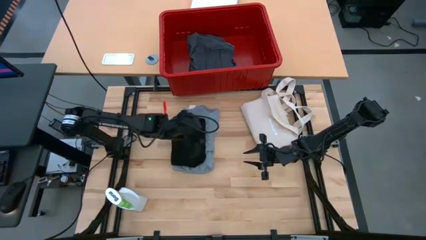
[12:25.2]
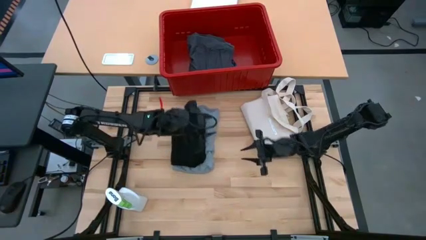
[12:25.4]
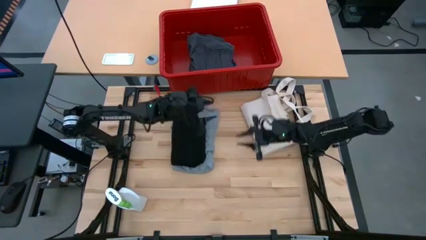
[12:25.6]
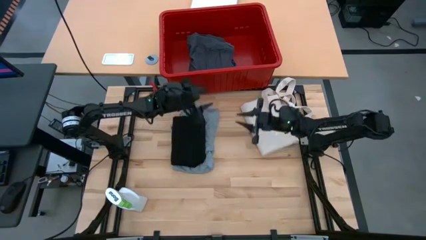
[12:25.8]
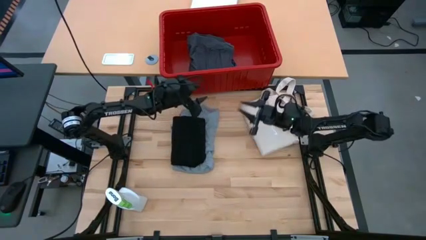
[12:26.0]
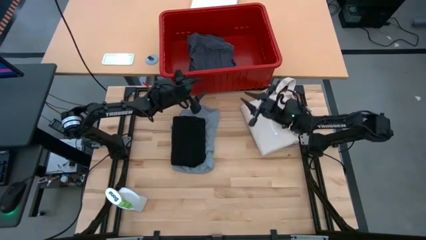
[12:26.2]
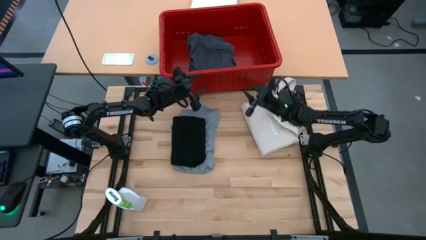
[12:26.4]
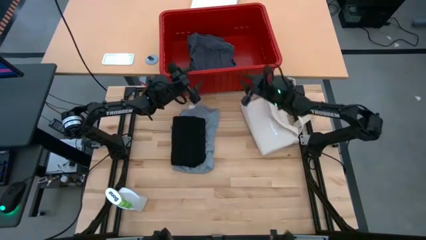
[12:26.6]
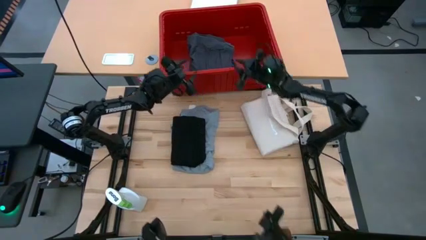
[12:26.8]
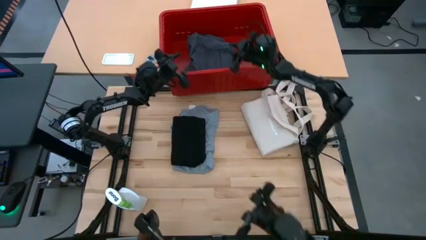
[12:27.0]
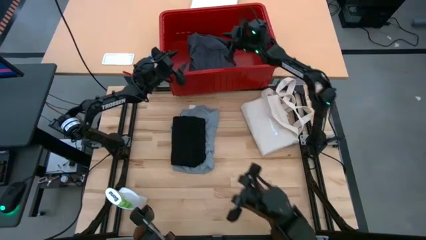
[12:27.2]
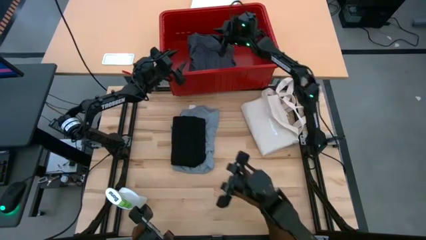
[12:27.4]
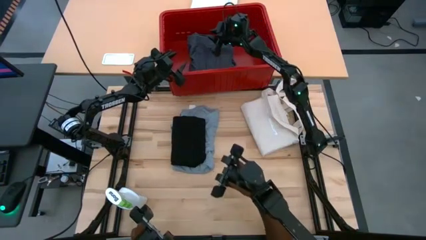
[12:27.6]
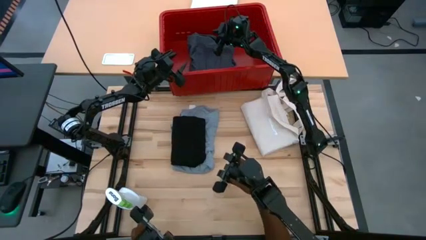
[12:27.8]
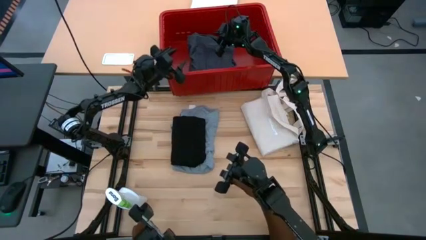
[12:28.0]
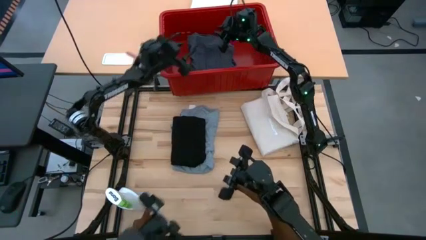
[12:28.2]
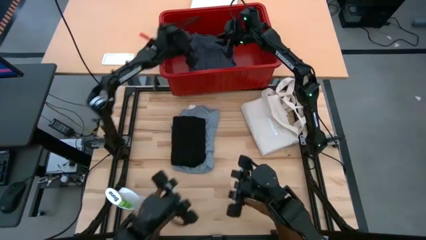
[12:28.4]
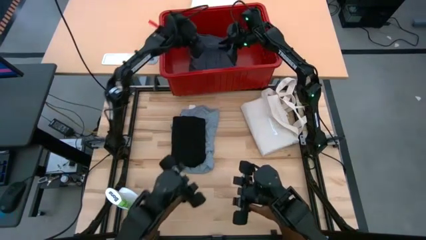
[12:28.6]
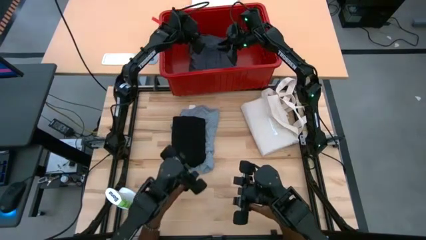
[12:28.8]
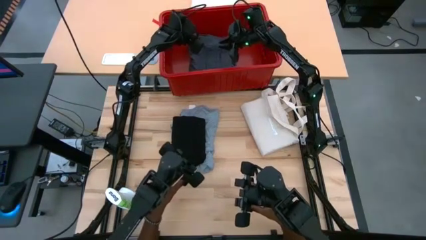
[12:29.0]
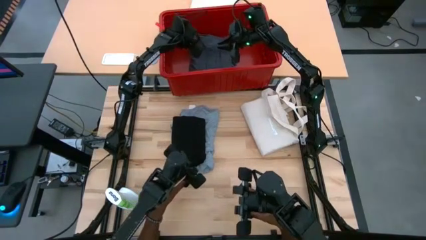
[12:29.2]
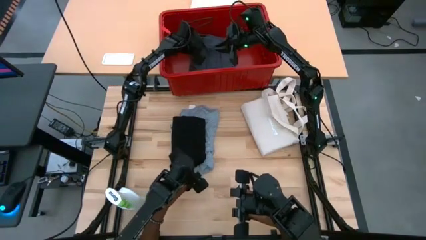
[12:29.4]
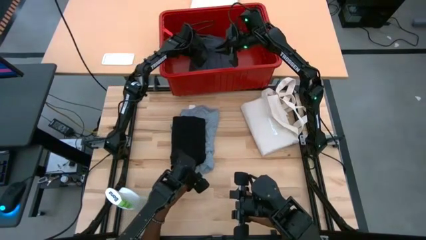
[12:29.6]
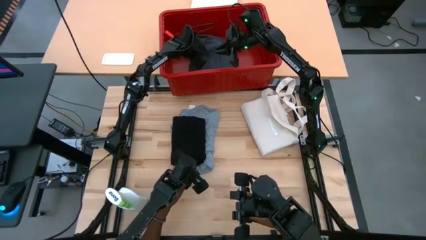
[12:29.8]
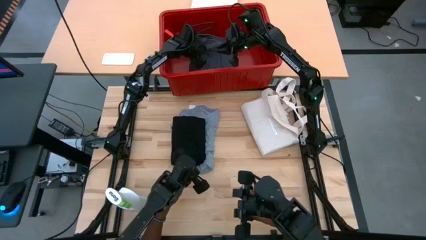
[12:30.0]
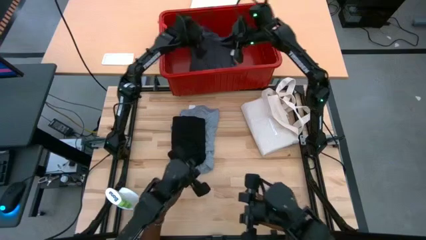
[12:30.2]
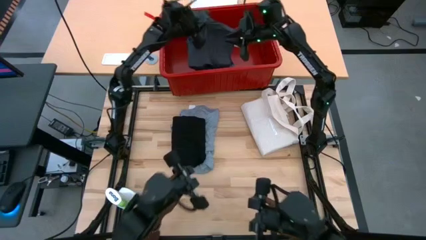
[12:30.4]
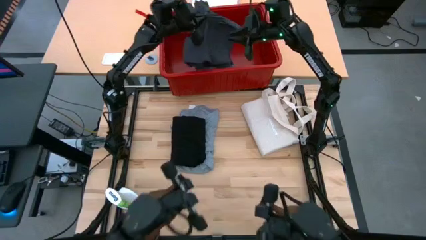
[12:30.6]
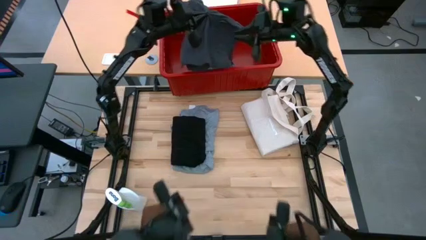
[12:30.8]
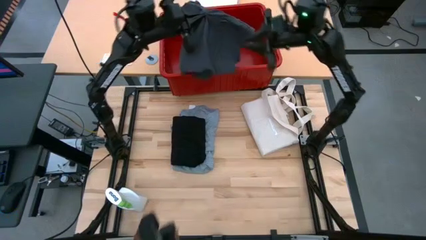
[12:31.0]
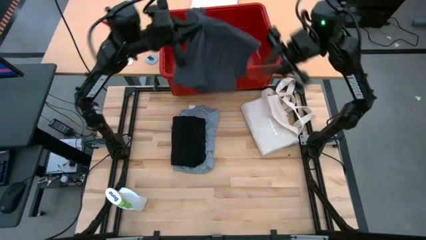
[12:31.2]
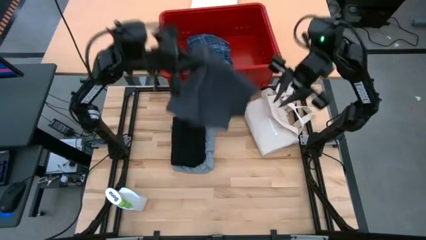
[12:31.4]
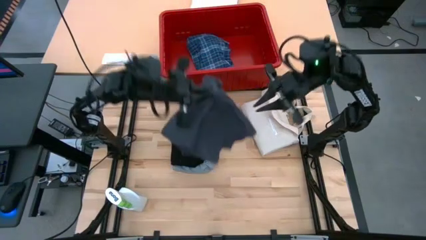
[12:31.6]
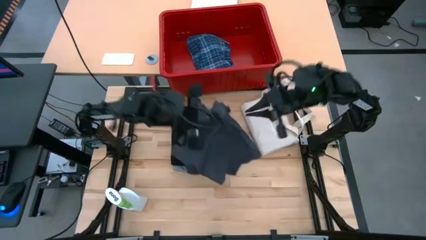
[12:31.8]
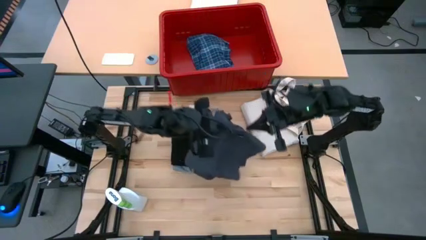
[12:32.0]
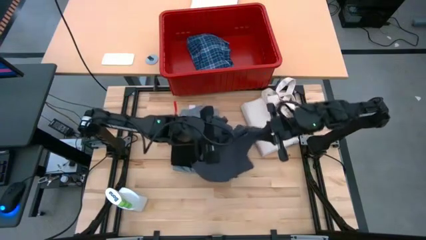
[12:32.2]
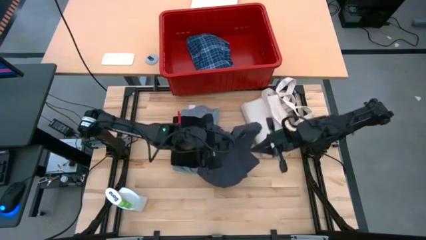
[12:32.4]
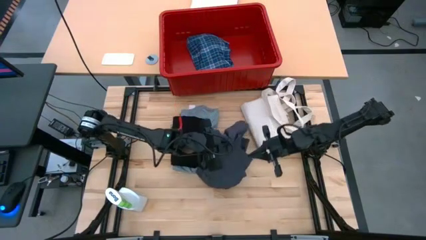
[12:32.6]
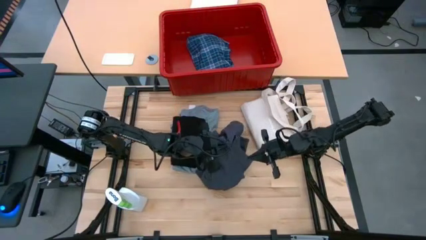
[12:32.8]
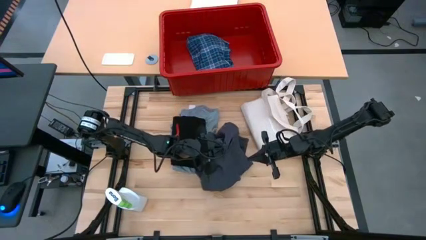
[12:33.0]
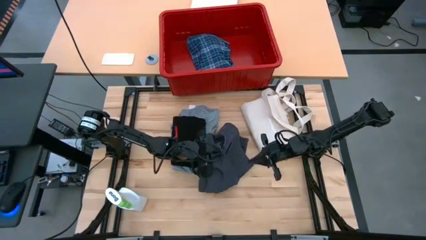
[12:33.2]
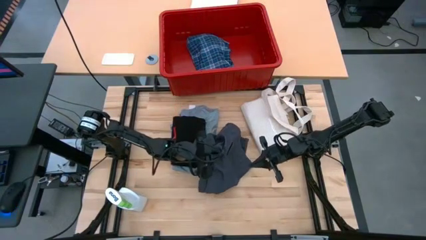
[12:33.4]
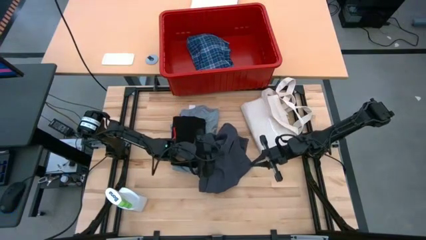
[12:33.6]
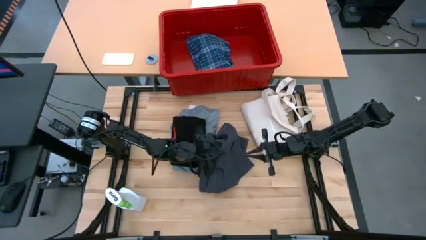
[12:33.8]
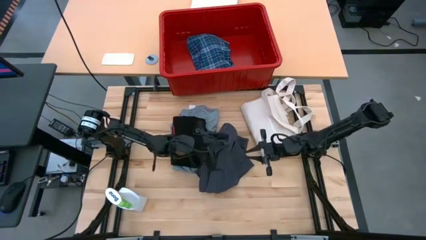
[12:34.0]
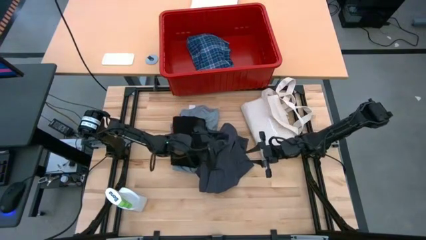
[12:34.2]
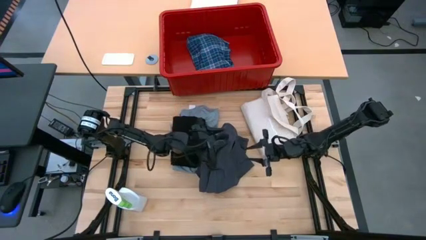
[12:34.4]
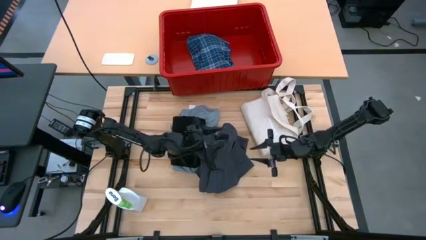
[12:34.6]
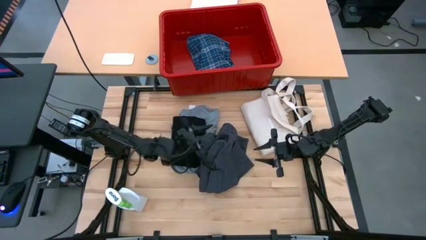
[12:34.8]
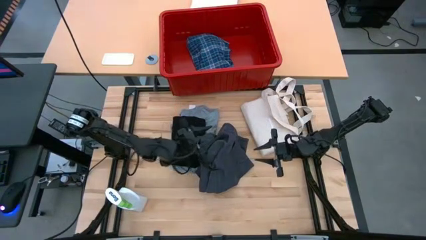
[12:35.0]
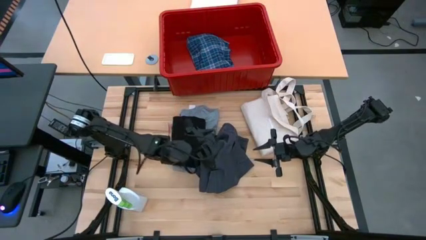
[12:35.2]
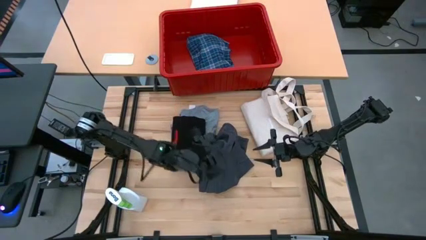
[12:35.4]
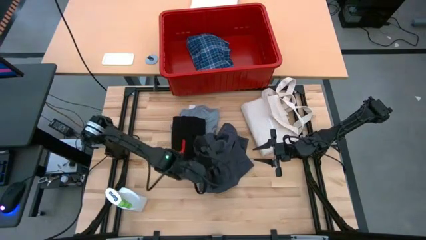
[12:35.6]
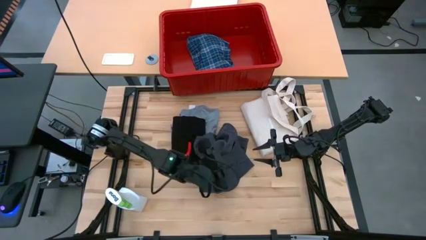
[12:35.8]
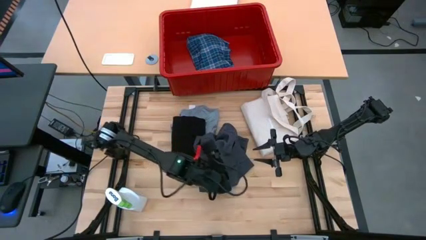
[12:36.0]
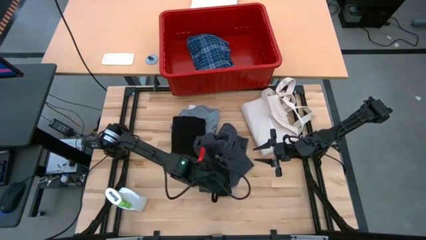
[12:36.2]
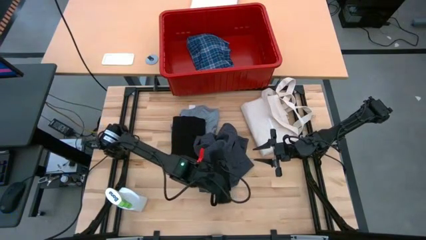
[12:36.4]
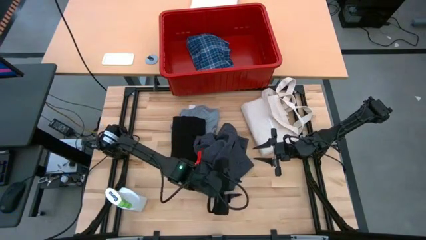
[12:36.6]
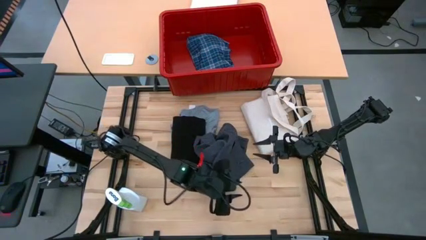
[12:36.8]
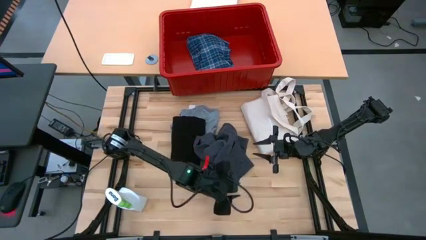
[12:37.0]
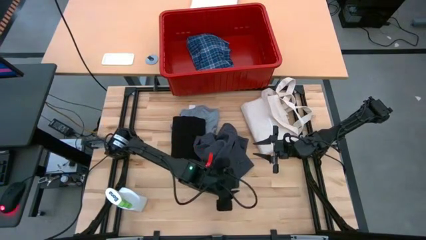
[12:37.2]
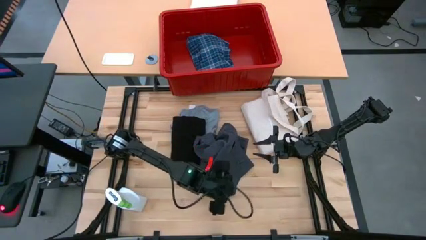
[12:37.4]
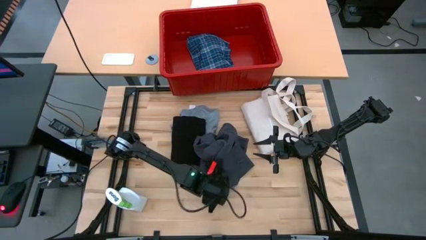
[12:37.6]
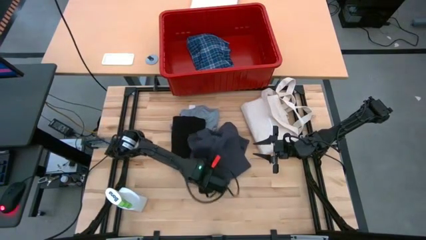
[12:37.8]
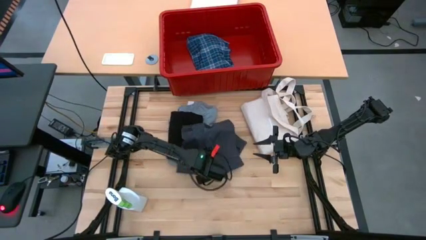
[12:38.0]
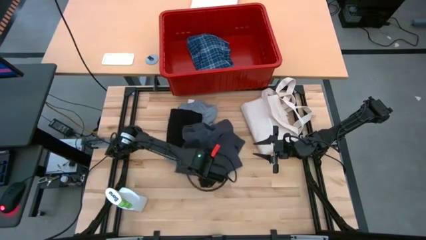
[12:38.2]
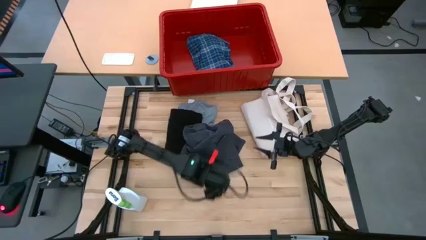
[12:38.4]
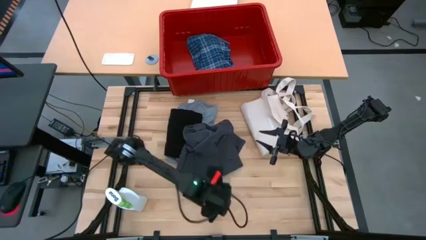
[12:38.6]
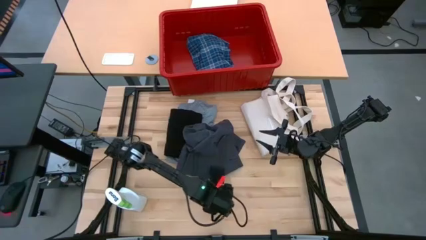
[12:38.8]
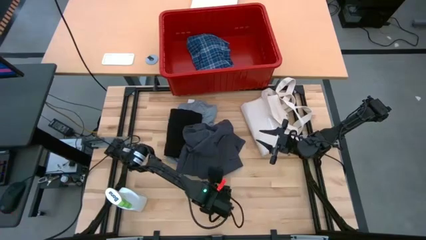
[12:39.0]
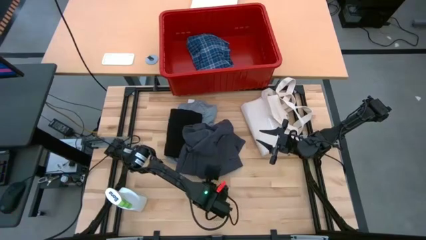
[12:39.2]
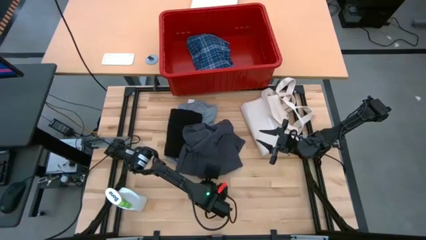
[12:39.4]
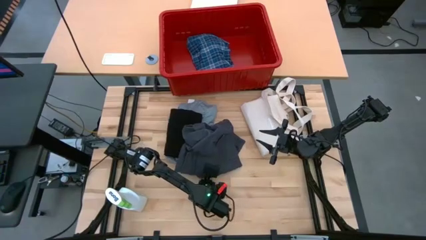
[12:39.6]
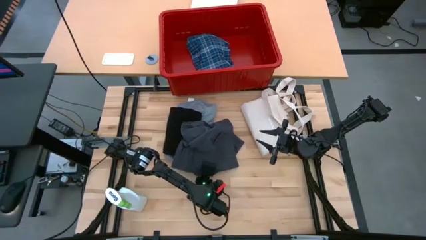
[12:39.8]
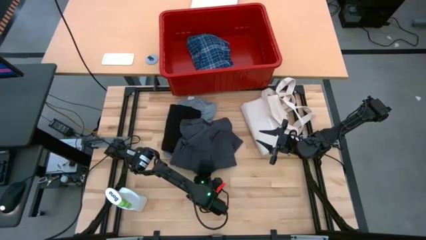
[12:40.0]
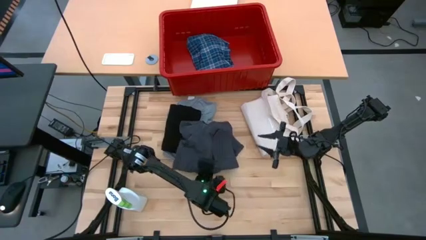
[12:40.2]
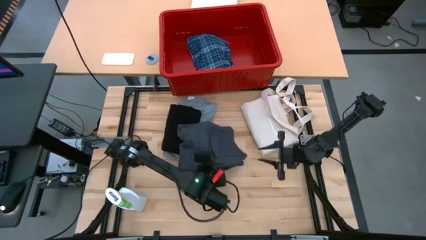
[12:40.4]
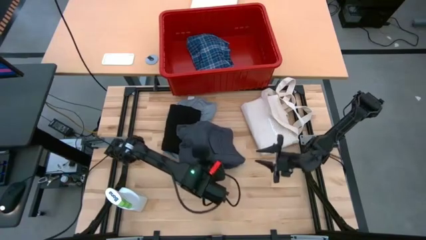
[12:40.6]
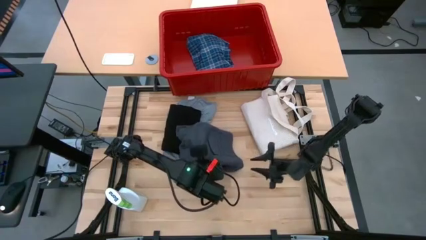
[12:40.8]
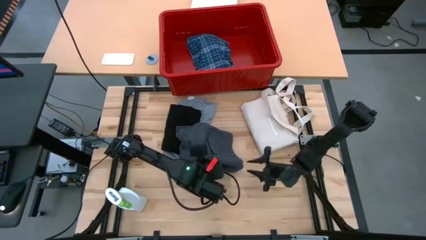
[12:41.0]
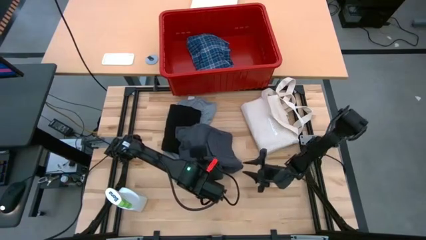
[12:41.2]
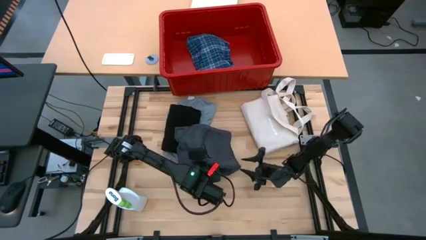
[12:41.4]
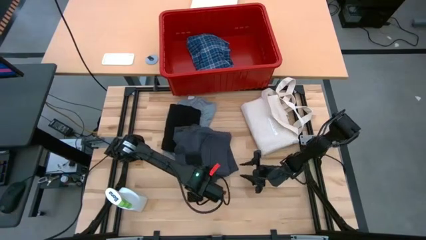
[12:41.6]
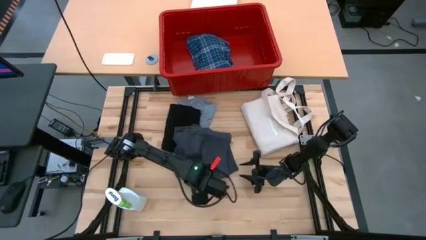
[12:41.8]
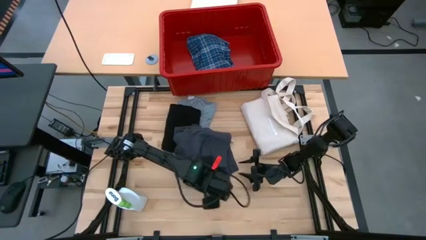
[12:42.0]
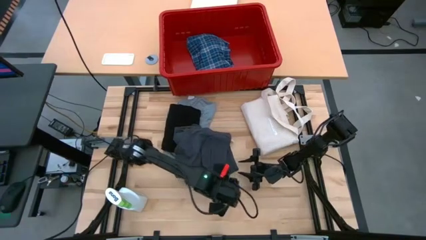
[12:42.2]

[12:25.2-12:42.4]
Task: Fold Laundry from Bin
Fold the gray short pants
